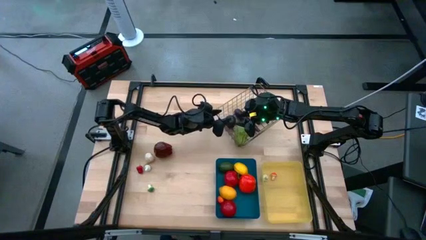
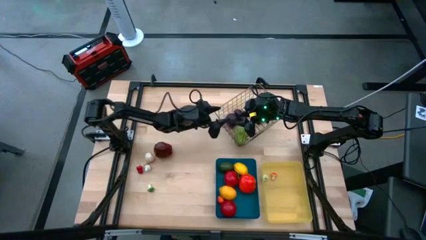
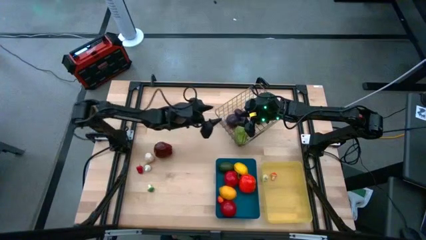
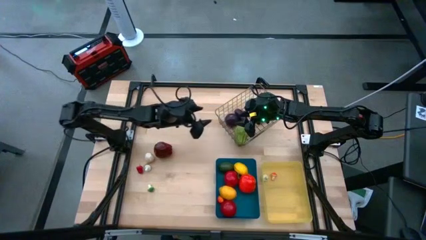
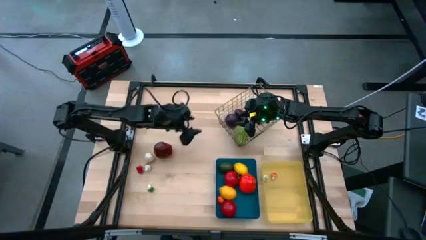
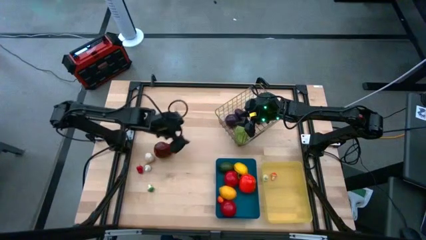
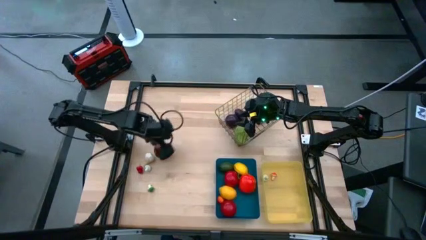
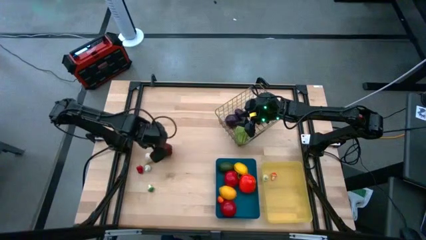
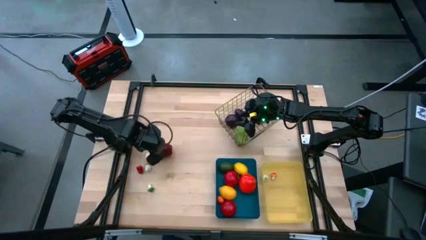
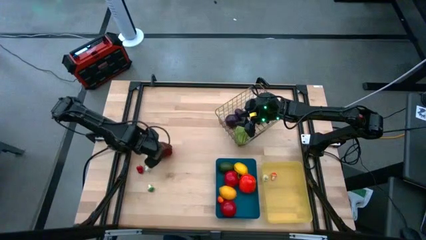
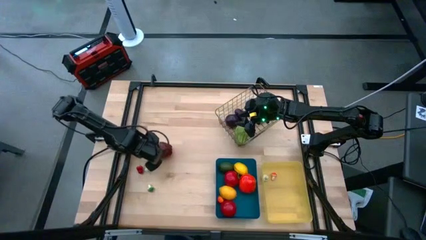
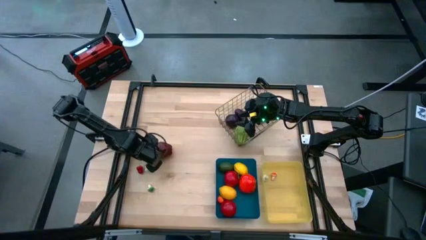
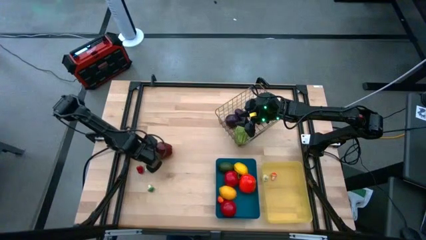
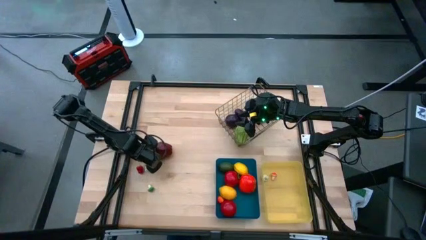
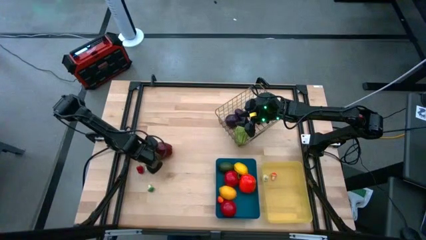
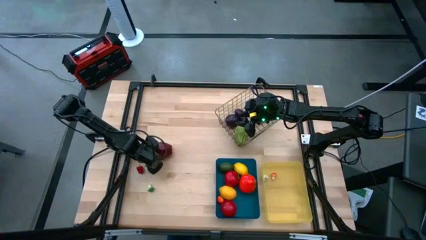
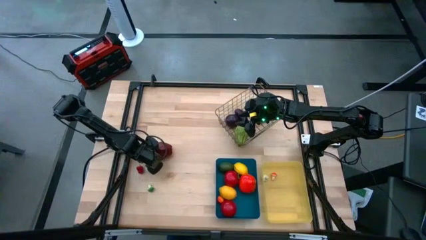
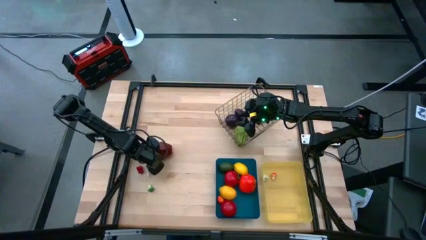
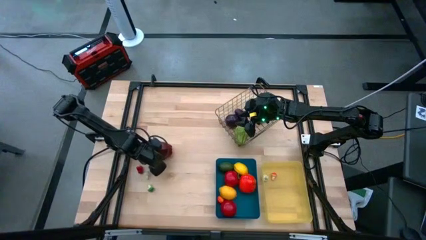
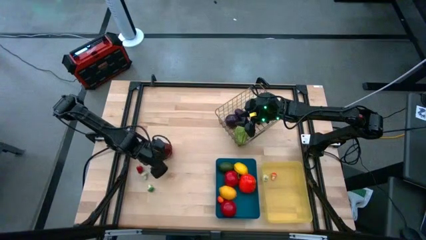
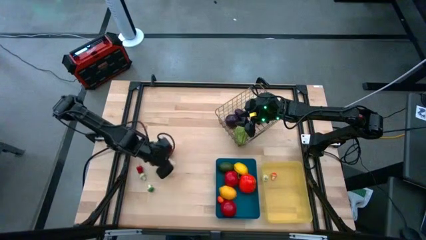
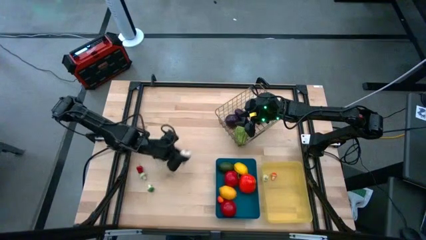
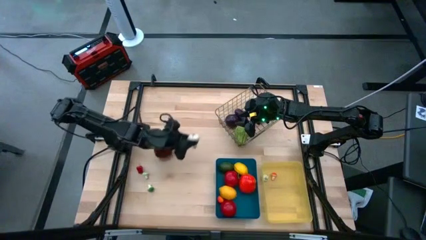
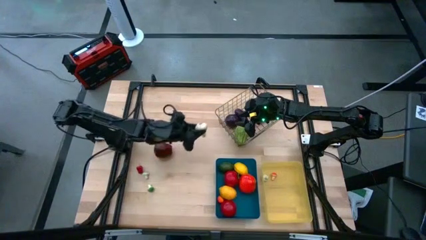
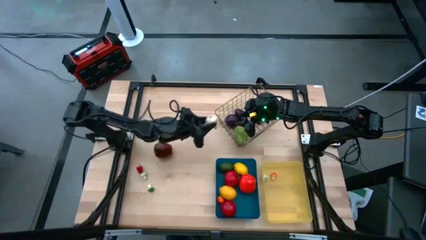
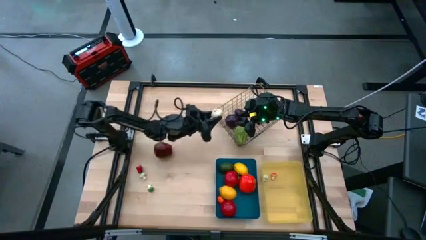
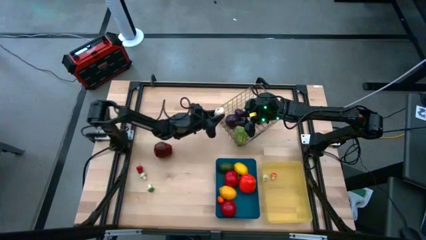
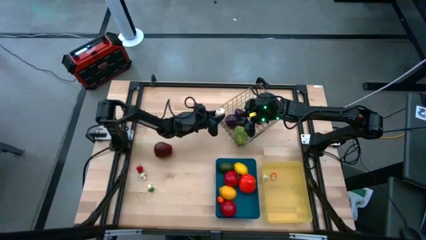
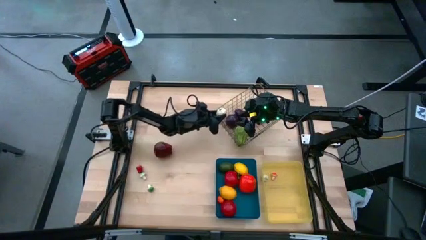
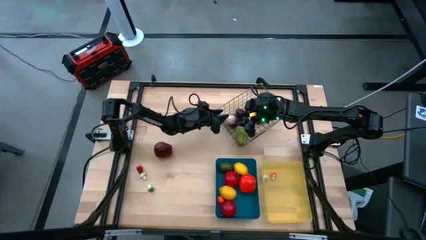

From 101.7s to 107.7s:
Task: Sort produce into baskets
Put the white garlic into the brown wire basket

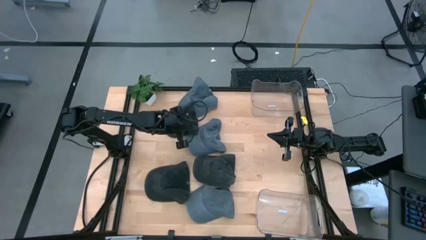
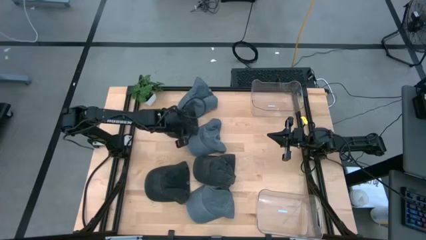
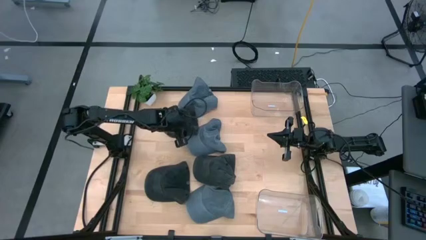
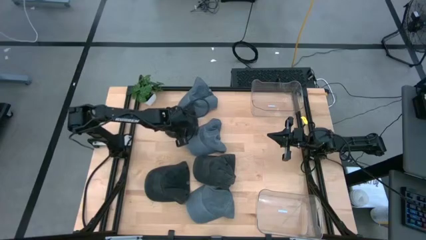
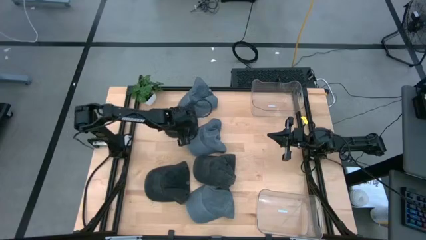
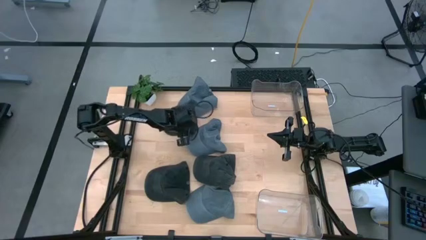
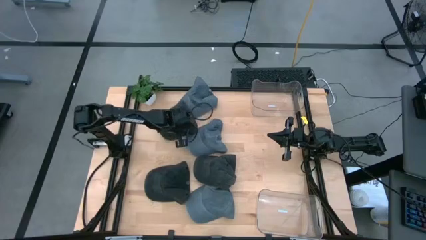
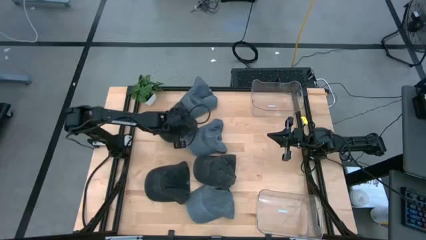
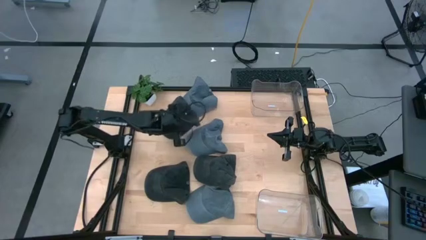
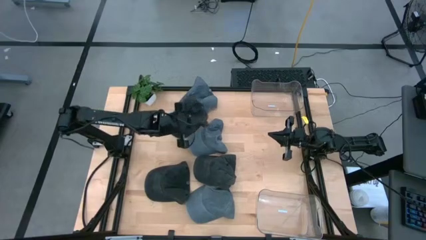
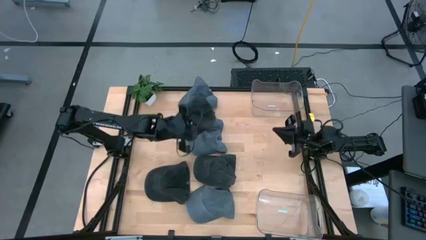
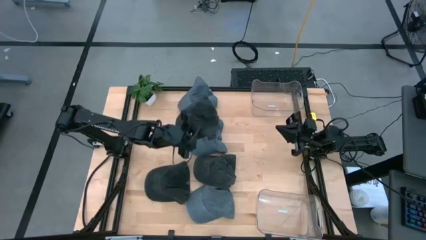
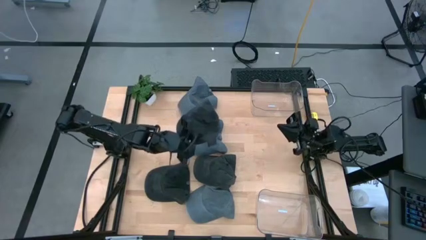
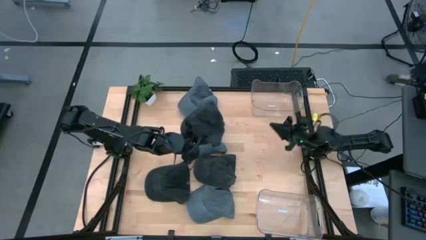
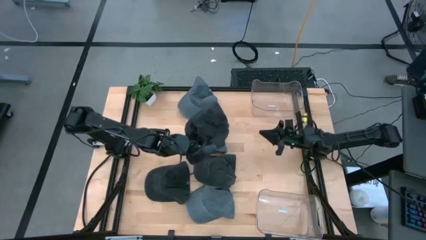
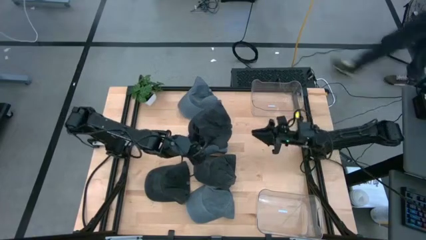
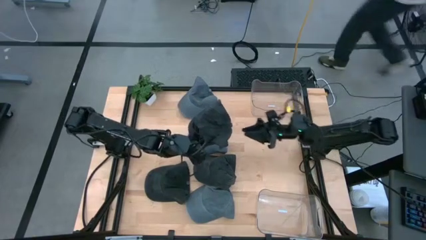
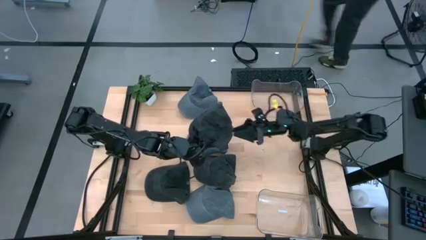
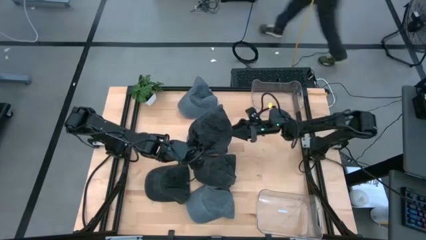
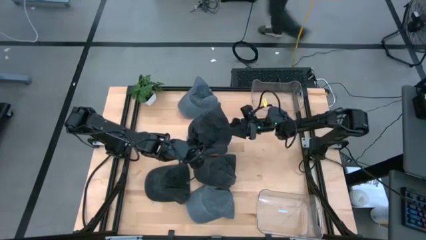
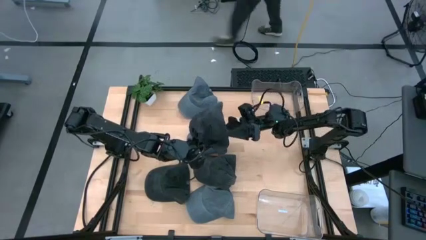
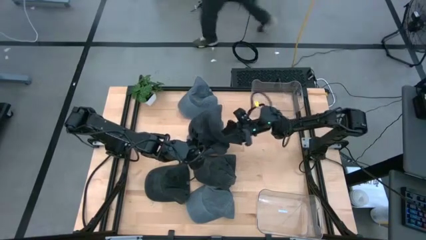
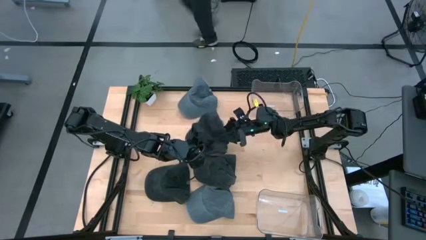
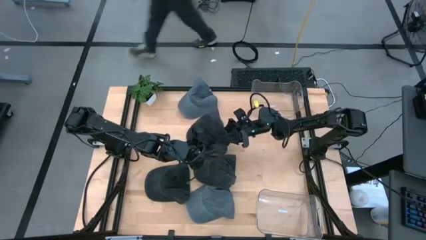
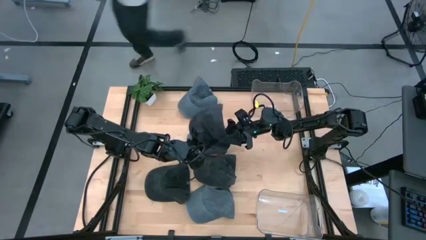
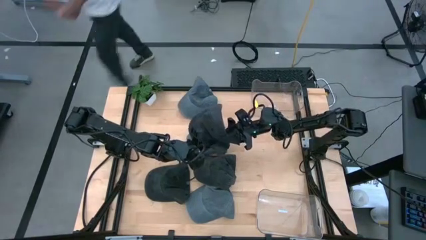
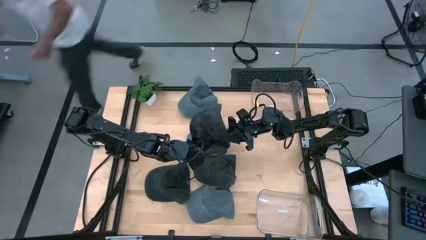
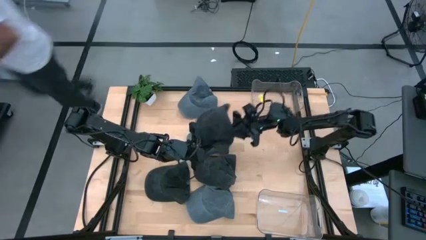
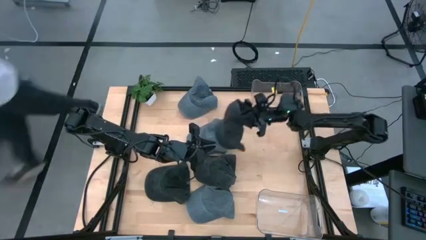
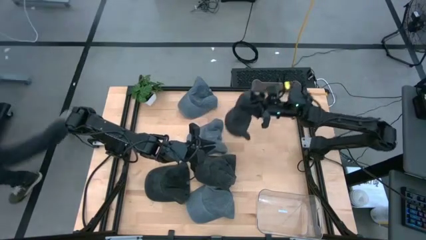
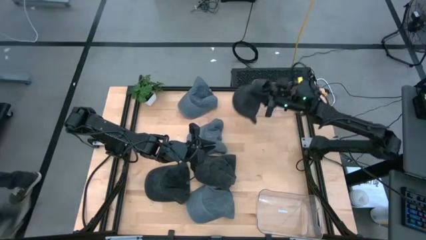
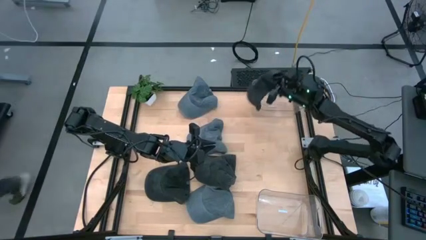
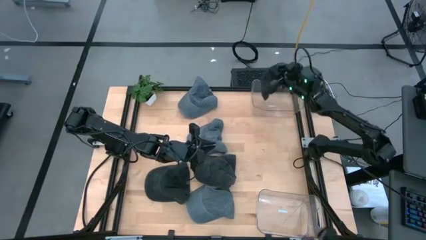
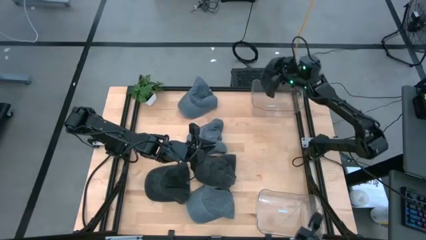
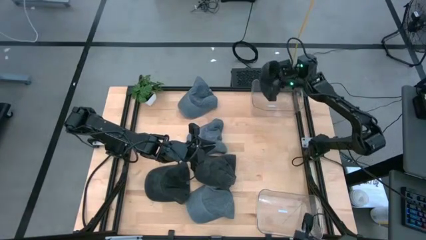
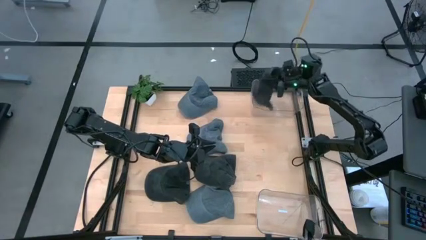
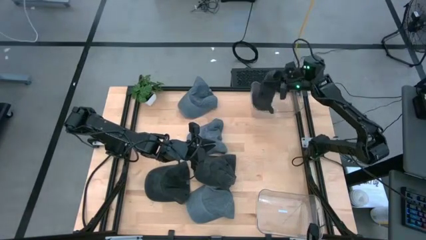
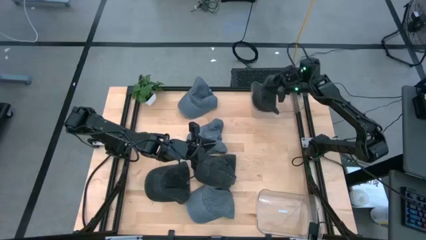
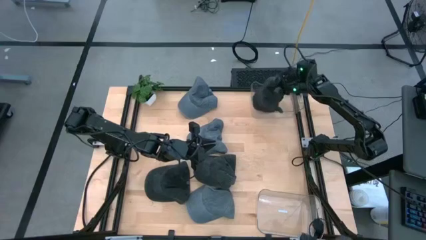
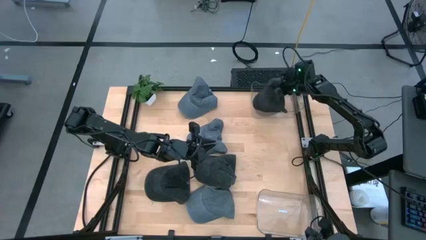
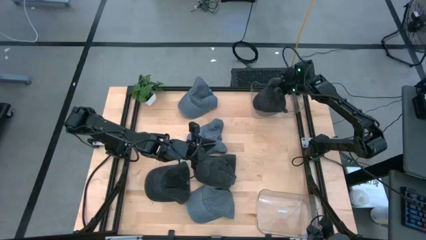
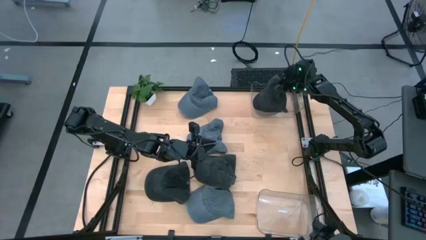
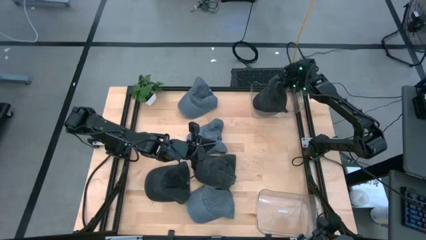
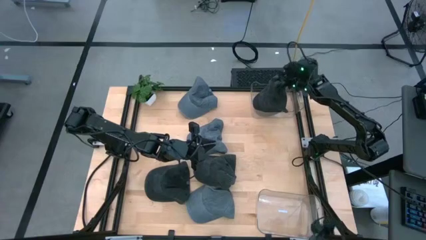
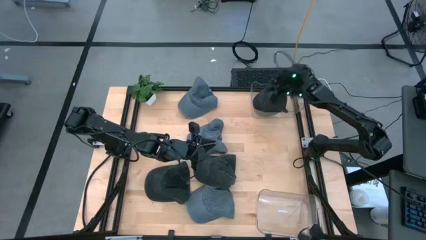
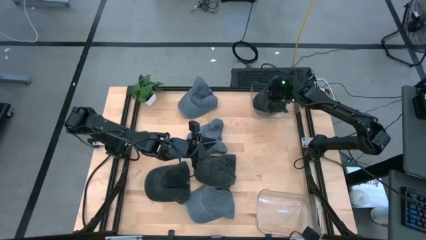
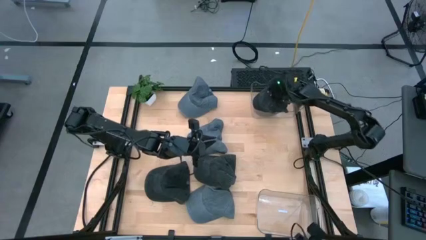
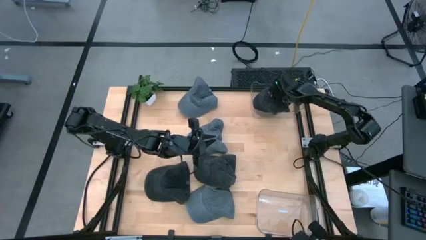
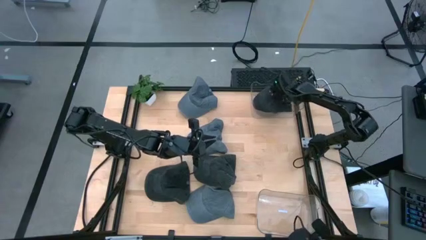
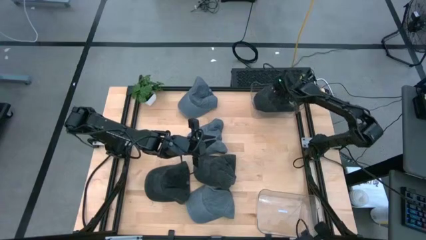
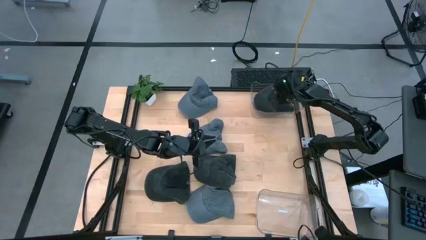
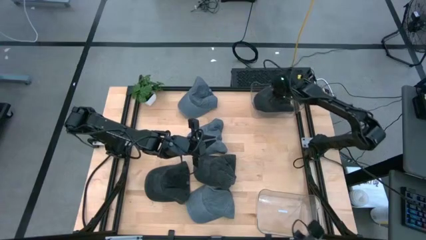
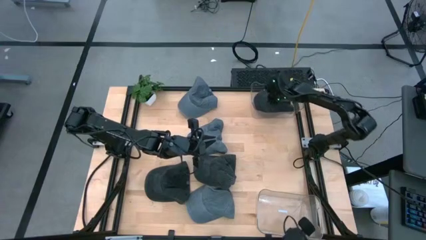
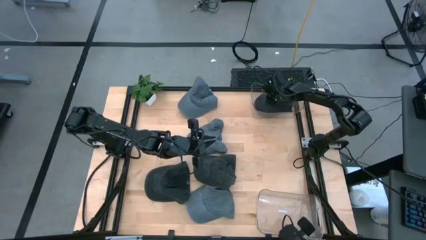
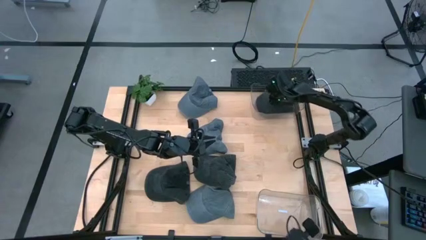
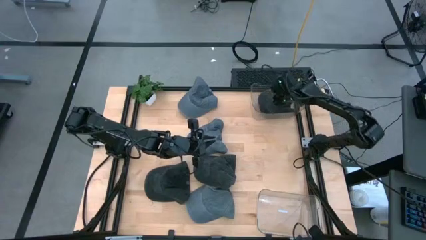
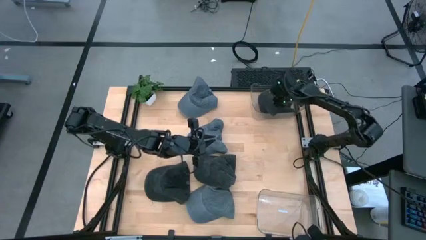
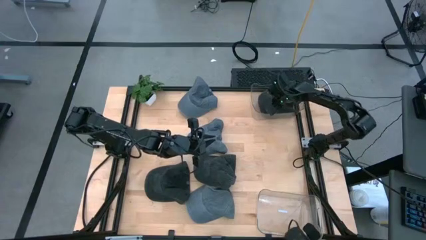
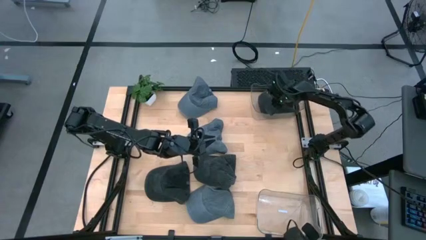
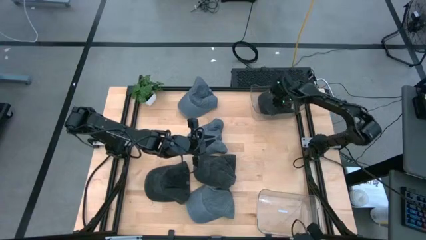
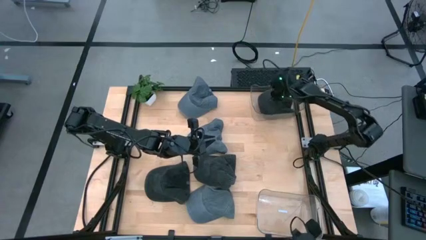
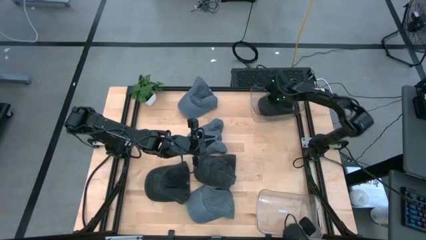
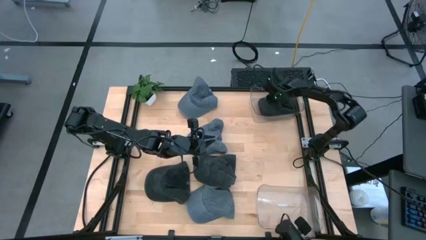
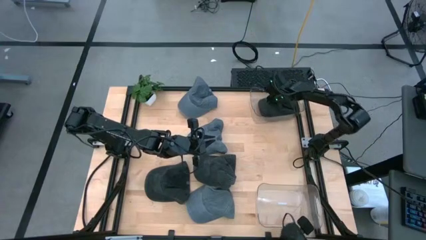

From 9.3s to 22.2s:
Task: Pick & Place hat
Put the top black cap into the top transparent bin
